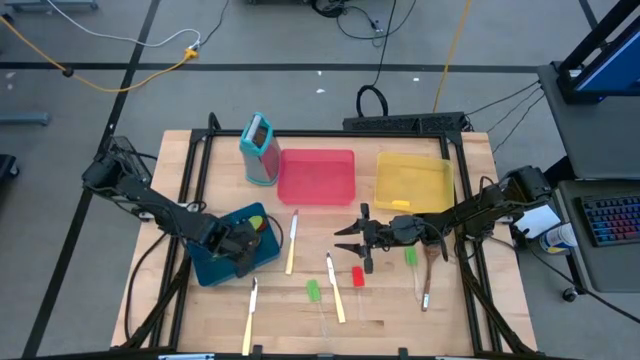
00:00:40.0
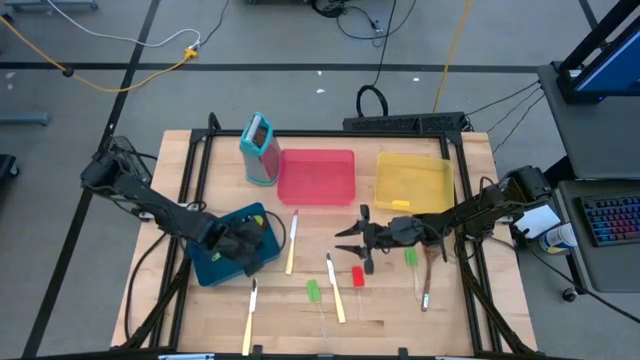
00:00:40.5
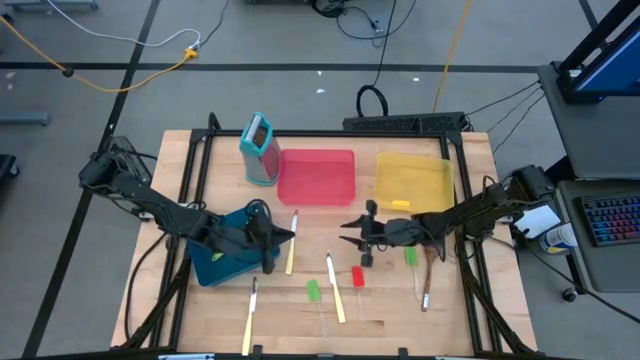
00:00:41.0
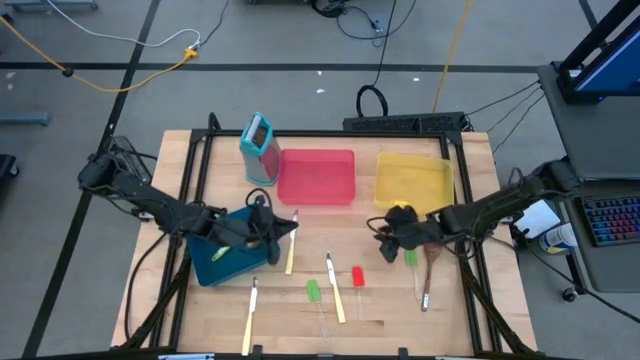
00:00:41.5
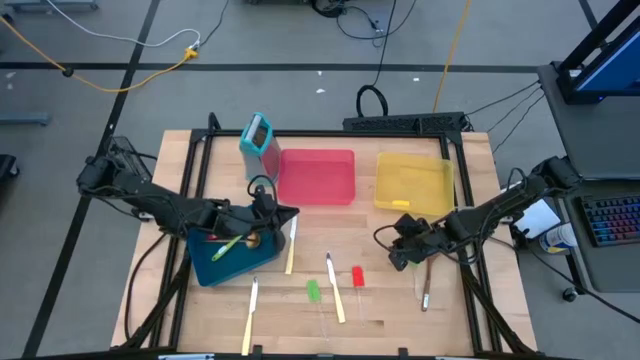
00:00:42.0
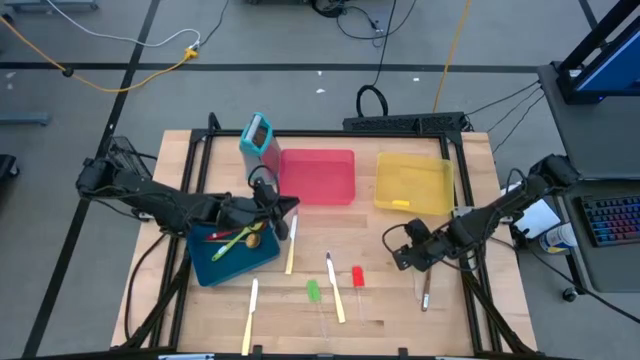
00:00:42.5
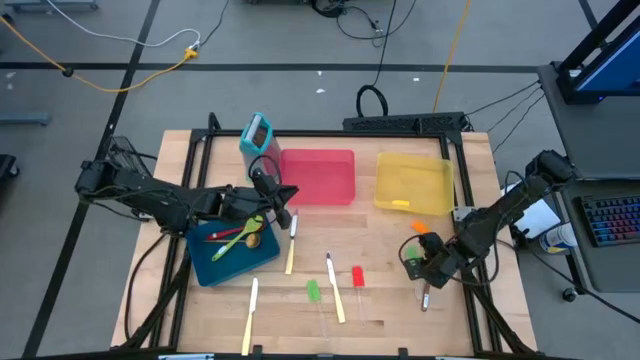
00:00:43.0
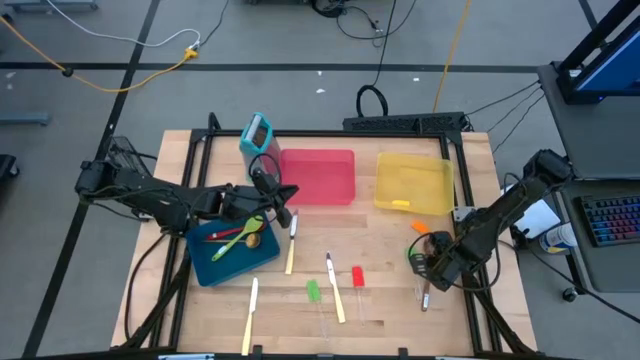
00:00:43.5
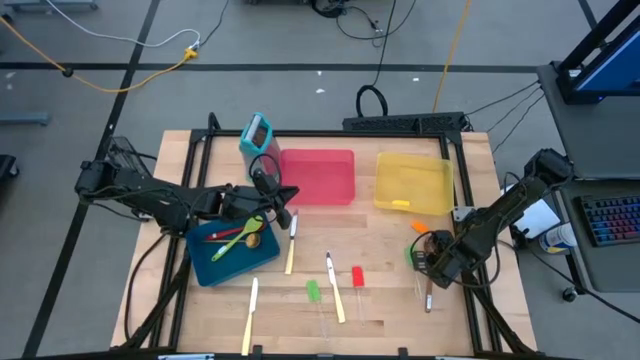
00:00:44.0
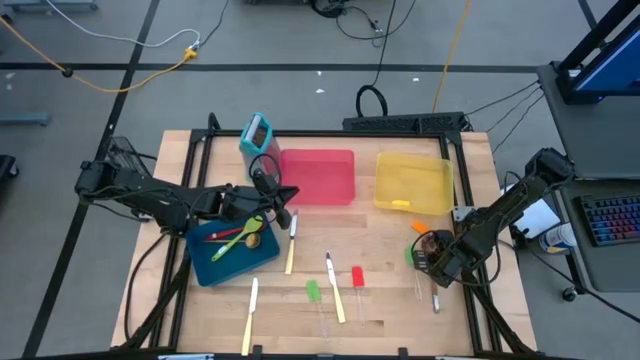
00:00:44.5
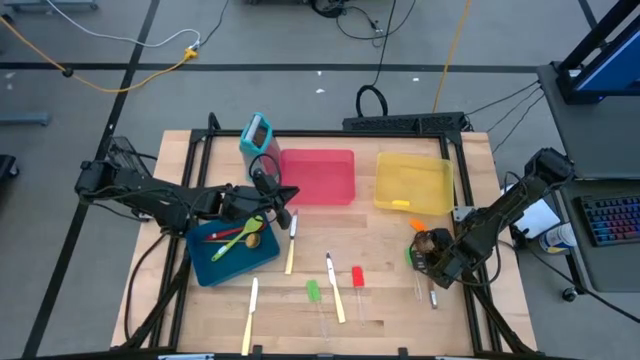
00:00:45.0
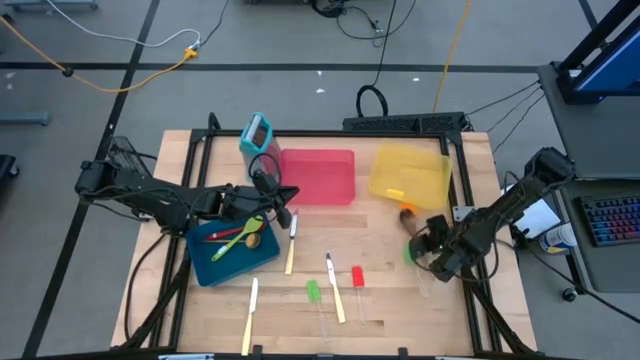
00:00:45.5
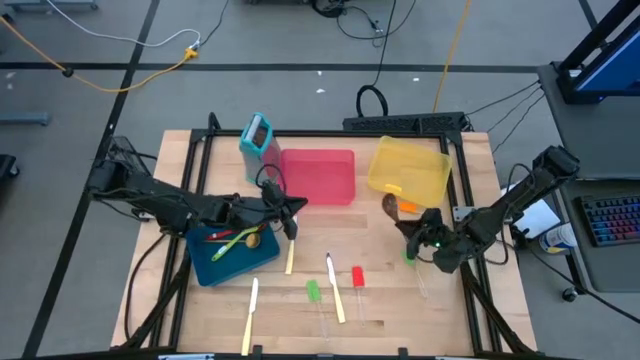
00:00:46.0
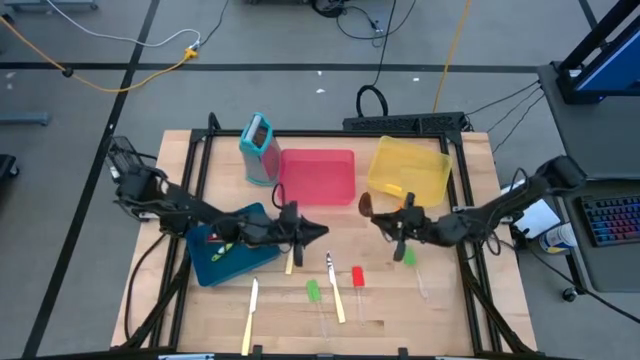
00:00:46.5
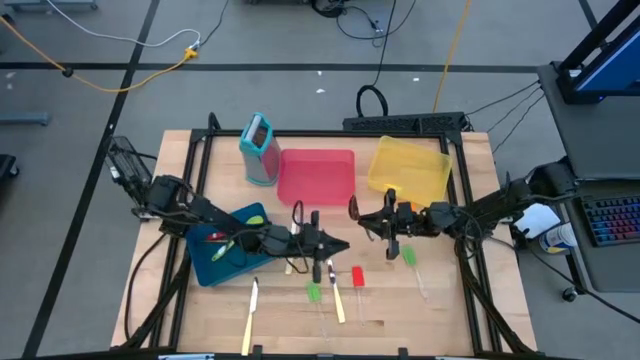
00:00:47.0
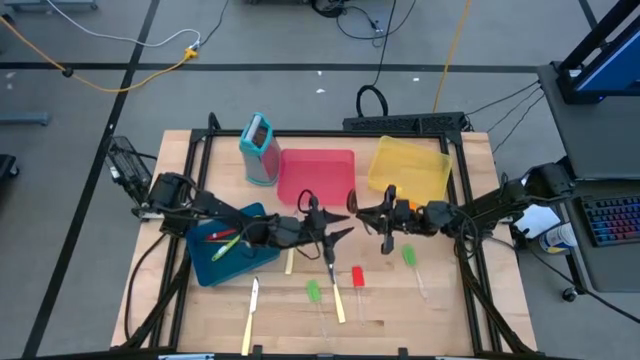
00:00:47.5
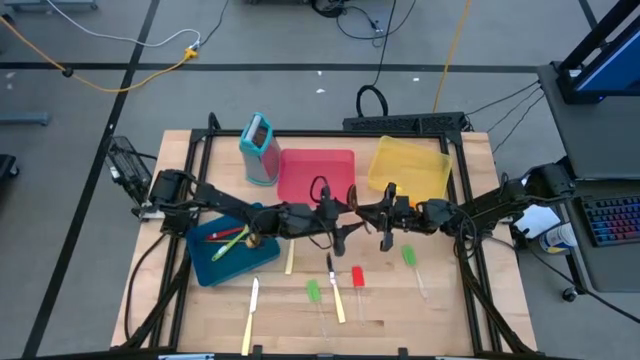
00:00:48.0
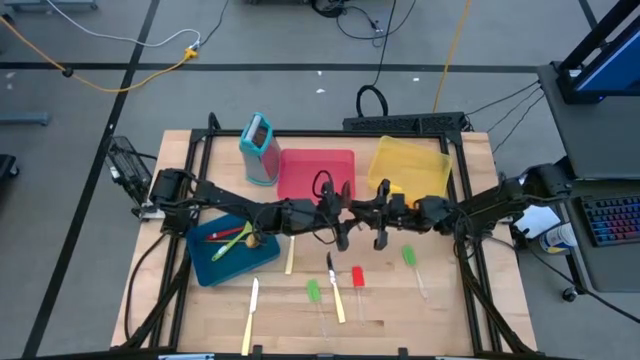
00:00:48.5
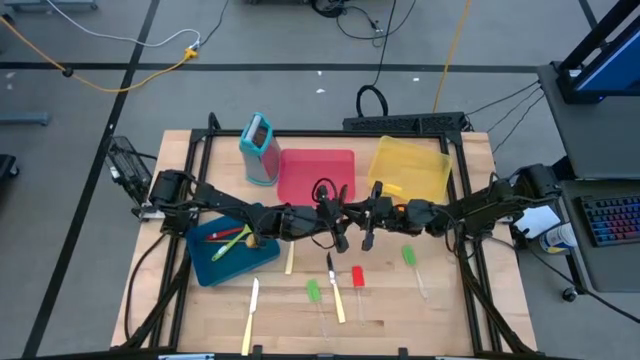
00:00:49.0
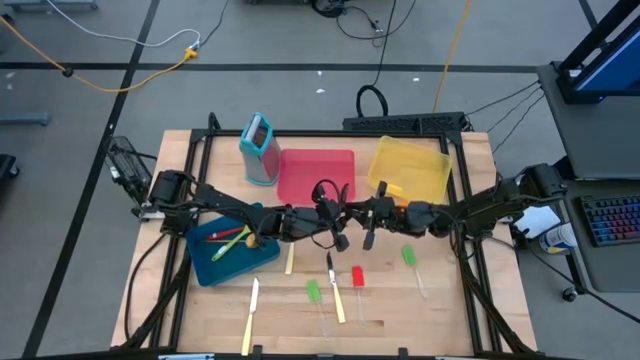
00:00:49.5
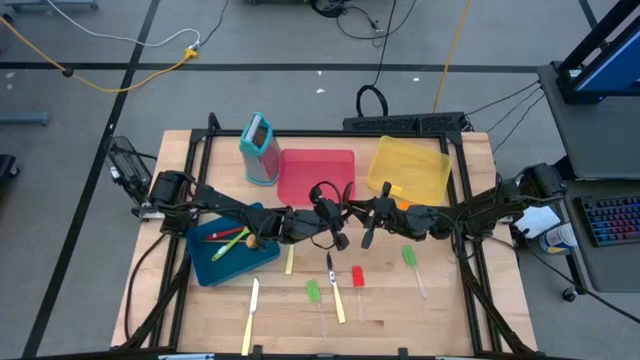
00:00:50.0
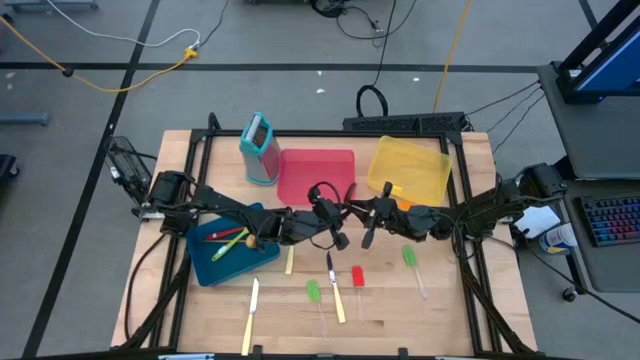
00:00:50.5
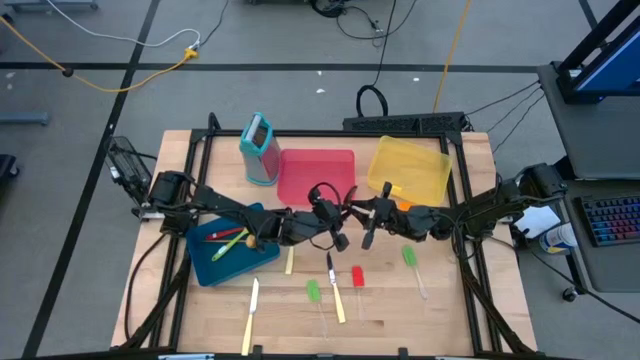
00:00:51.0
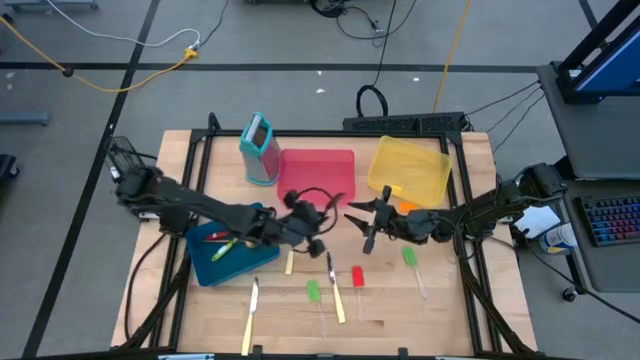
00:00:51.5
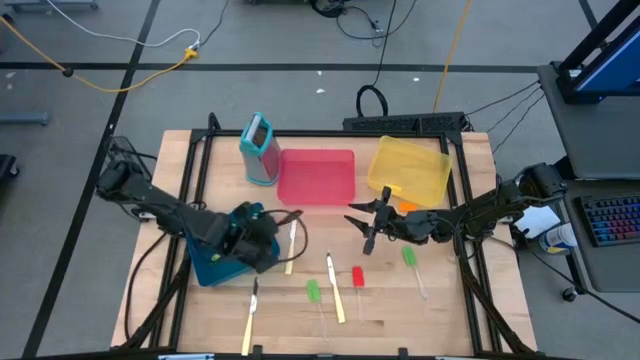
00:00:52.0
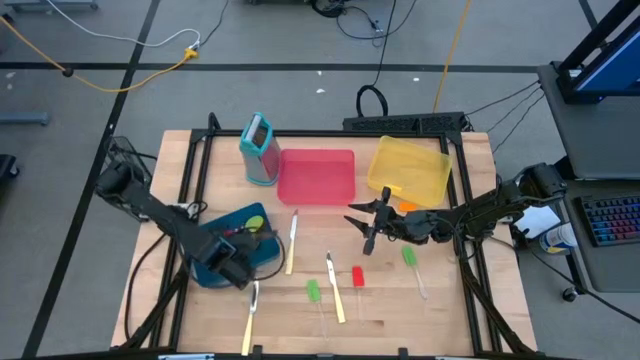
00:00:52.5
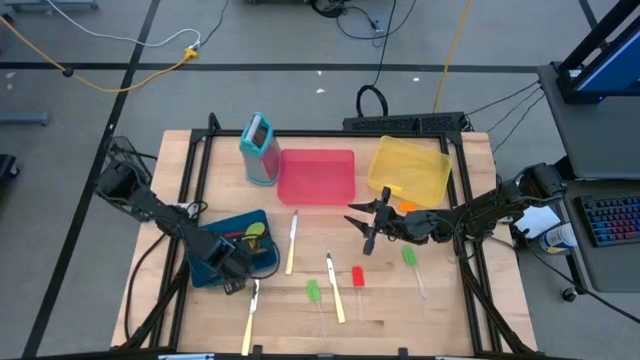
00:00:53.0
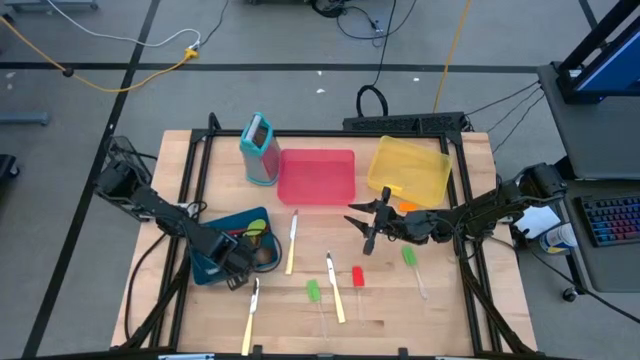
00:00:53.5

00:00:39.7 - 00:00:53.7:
Task: Pick & Place Kitchen Items
Put the wooden spoon into the blue bin

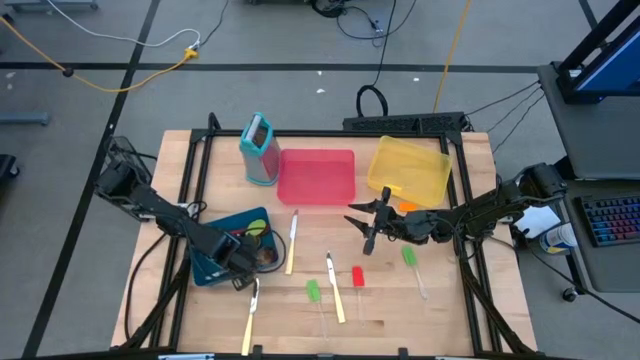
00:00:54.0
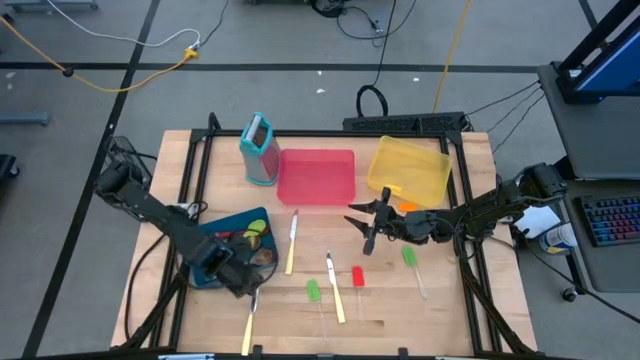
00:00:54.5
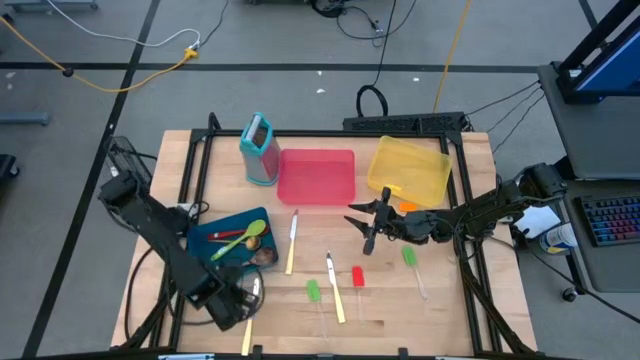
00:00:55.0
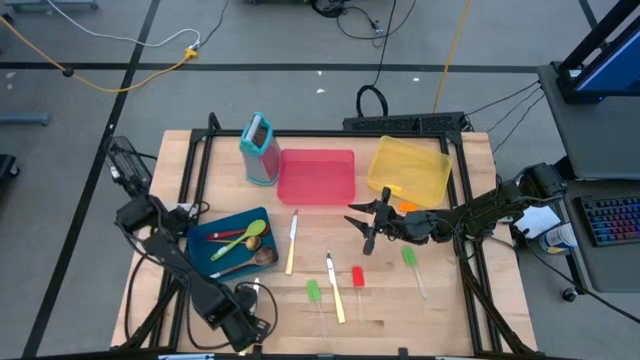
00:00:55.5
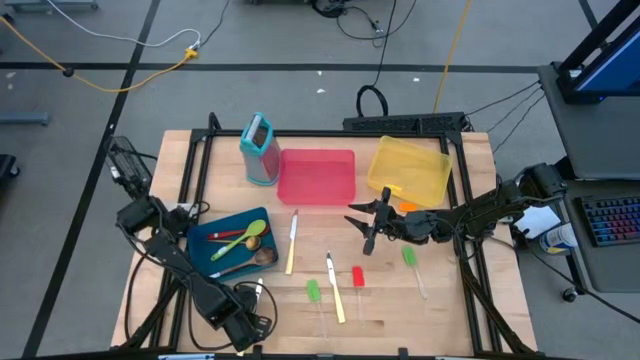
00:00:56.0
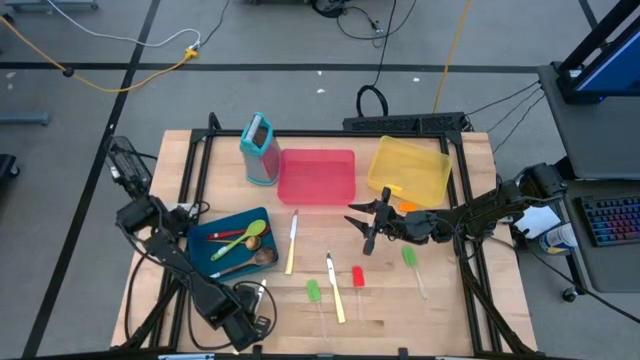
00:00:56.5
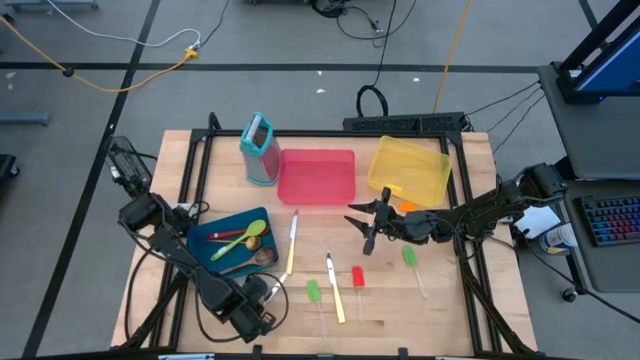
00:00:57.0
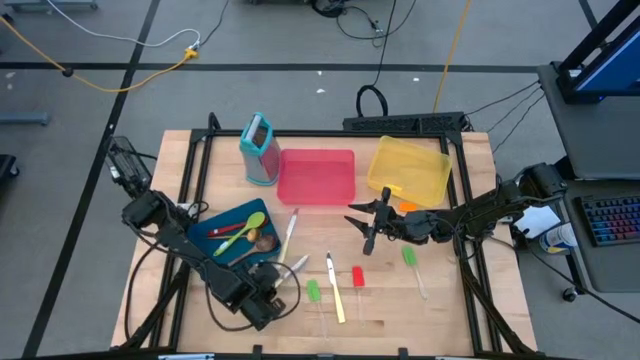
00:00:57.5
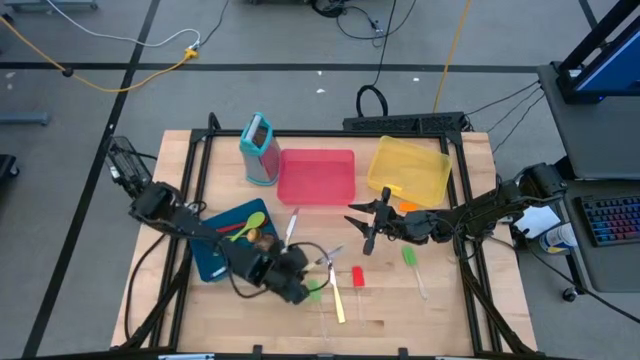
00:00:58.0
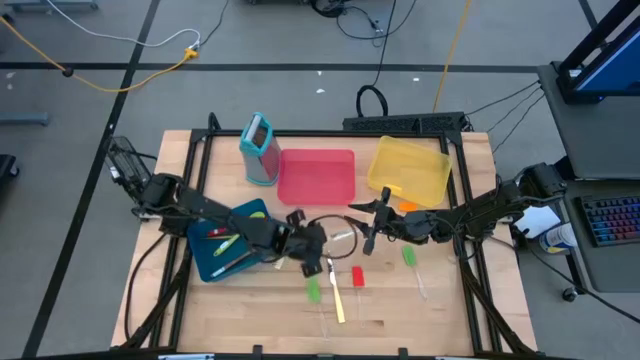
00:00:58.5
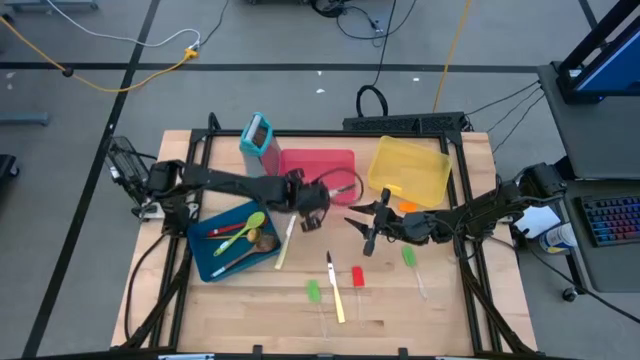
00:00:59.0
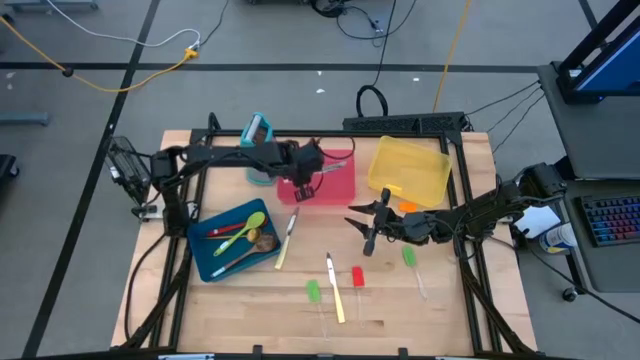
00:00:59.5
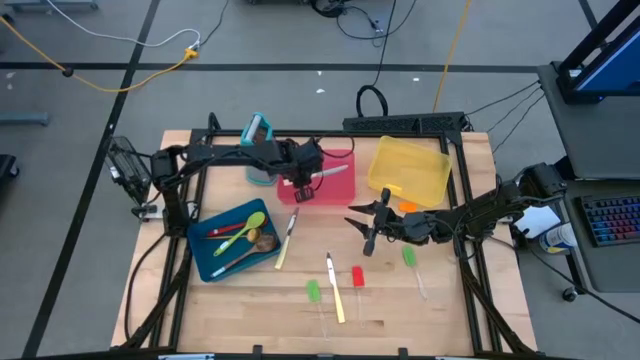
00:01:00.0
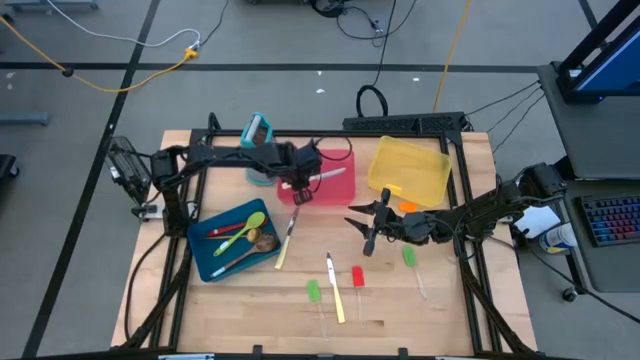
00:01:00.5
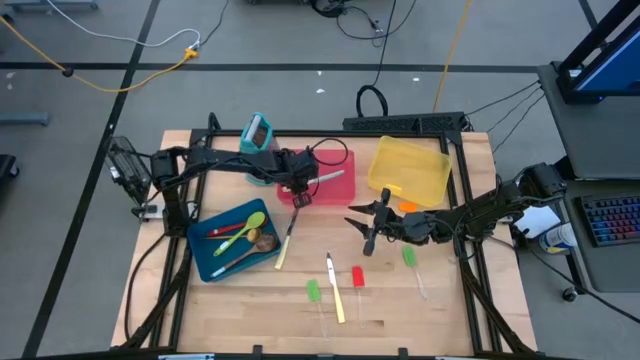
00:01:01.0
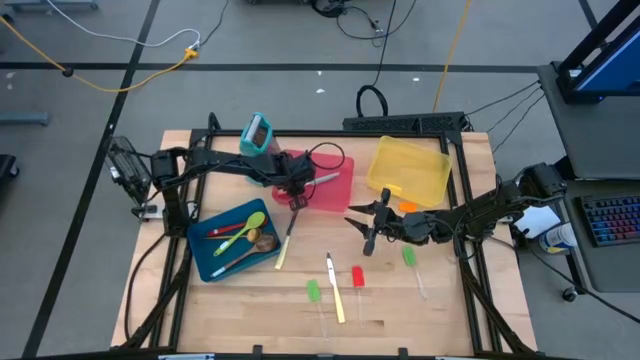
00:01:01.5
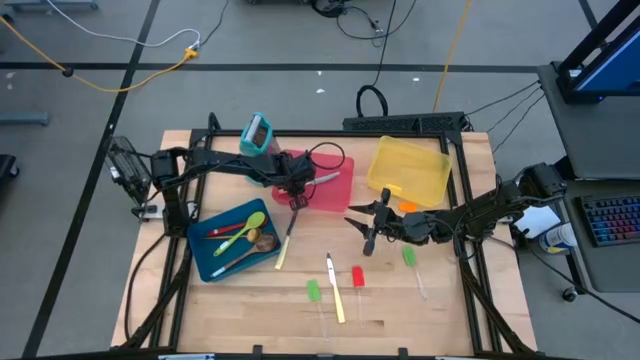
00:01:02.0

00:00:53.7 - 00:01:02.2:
Put the bottom left yellow knife into the pink bin
